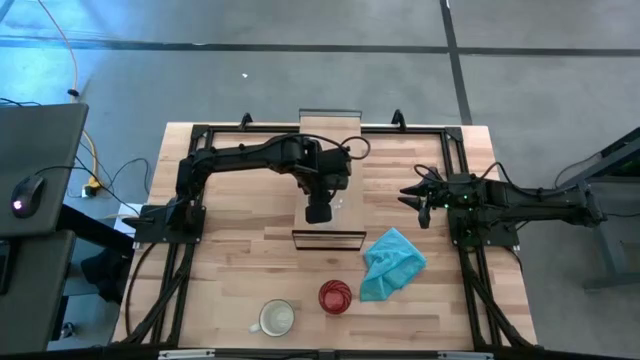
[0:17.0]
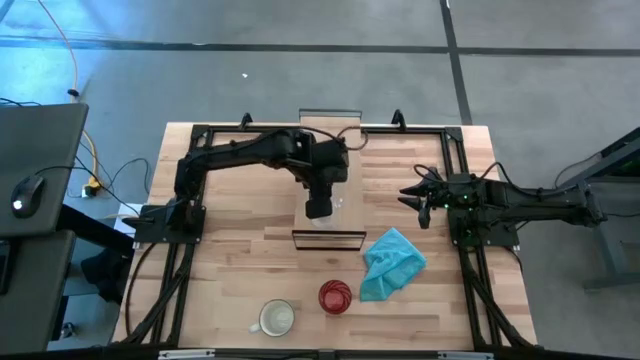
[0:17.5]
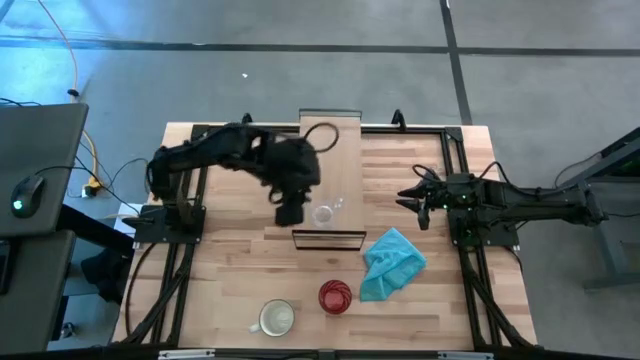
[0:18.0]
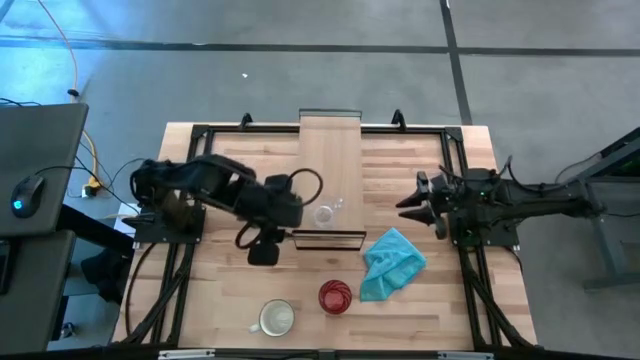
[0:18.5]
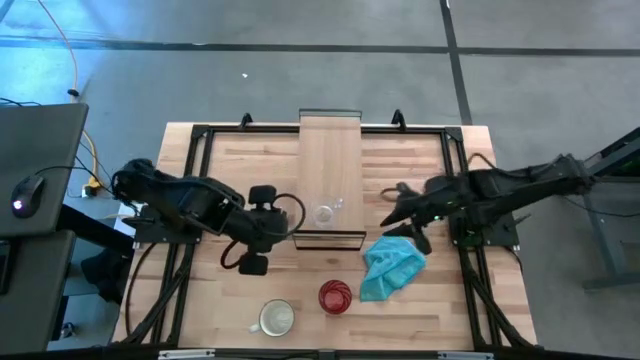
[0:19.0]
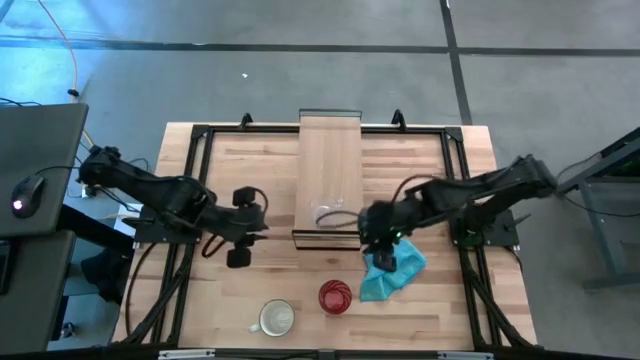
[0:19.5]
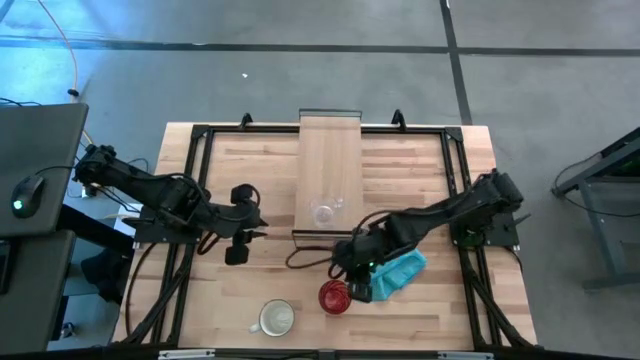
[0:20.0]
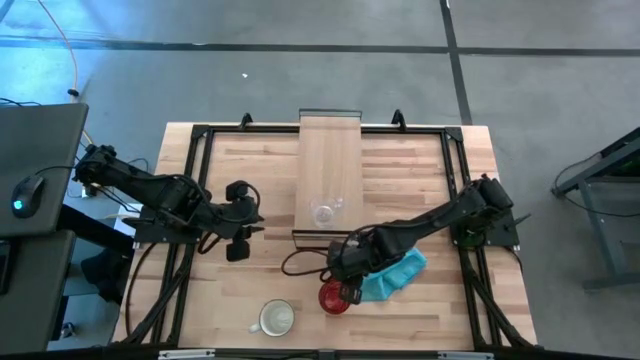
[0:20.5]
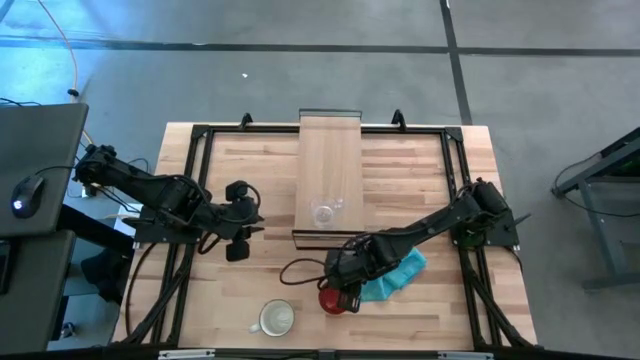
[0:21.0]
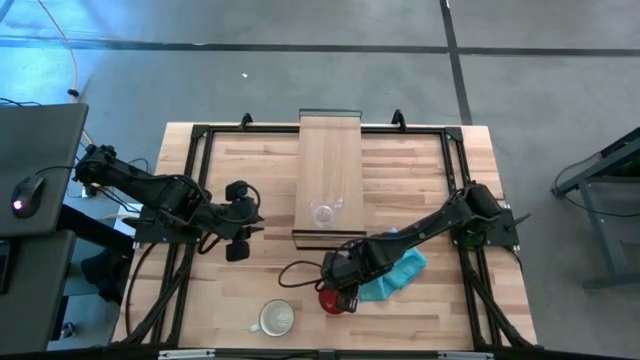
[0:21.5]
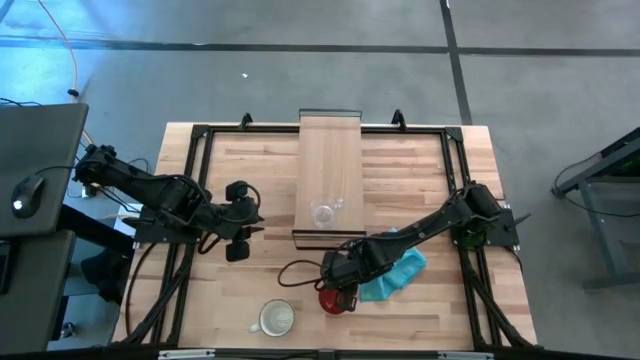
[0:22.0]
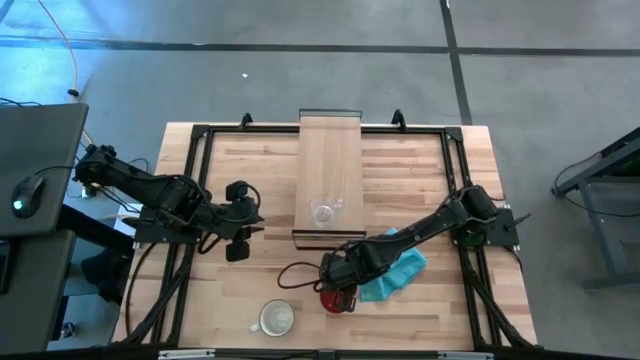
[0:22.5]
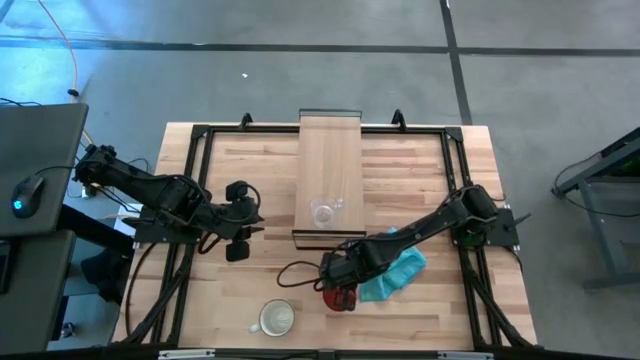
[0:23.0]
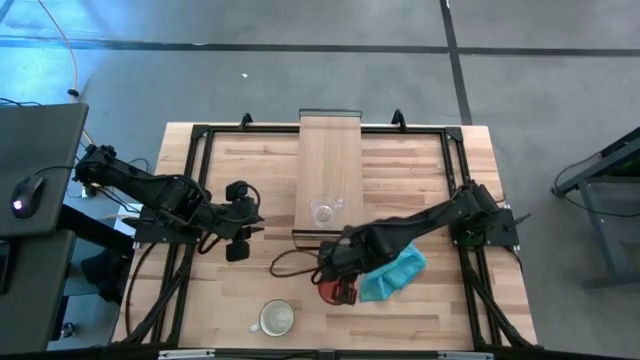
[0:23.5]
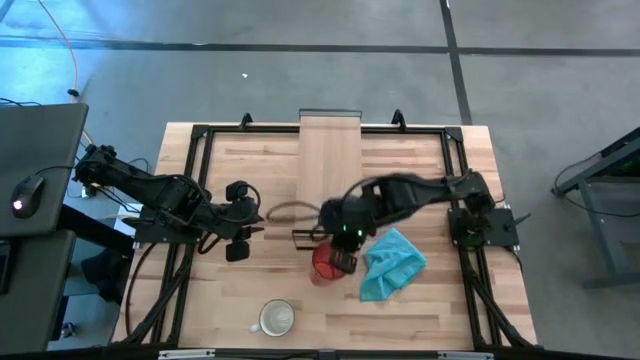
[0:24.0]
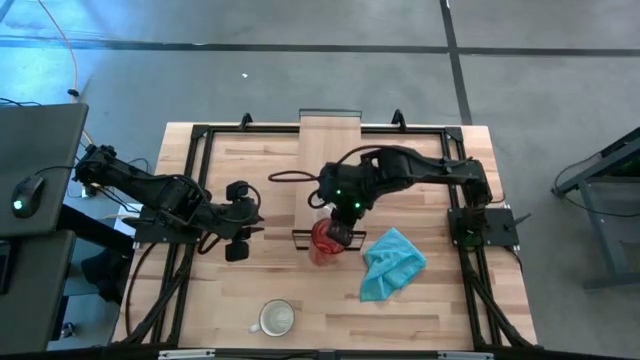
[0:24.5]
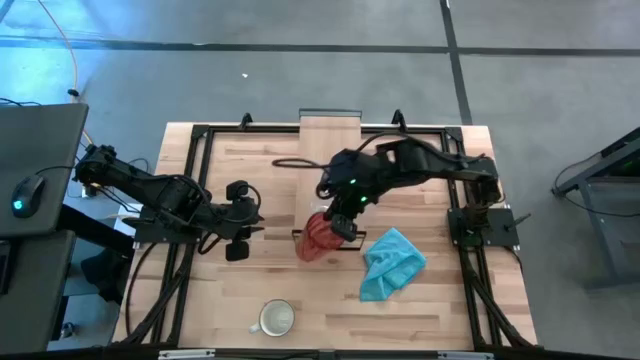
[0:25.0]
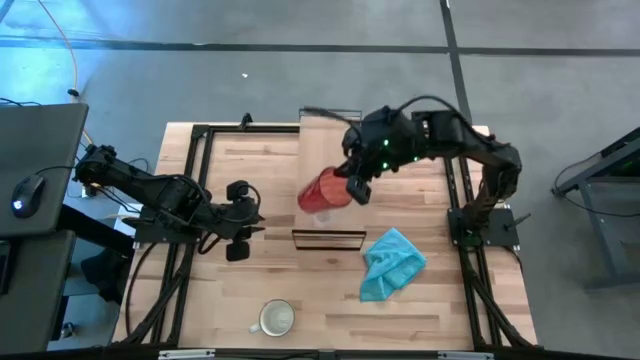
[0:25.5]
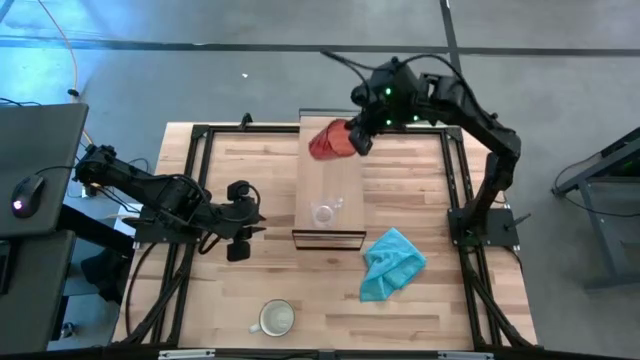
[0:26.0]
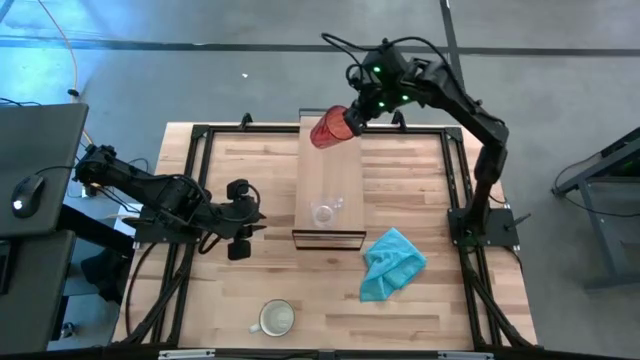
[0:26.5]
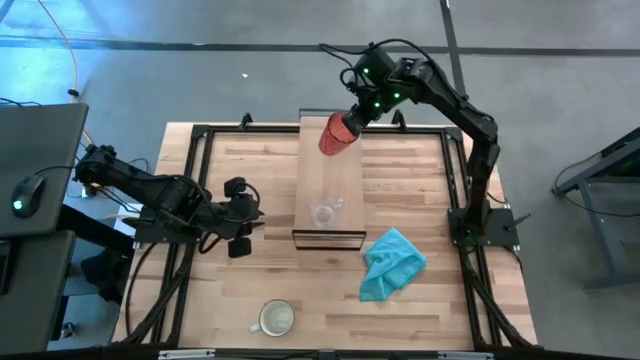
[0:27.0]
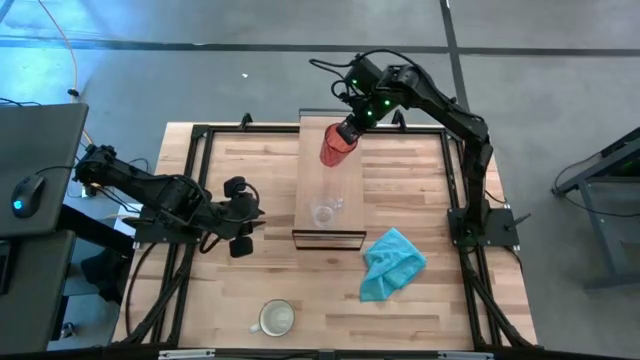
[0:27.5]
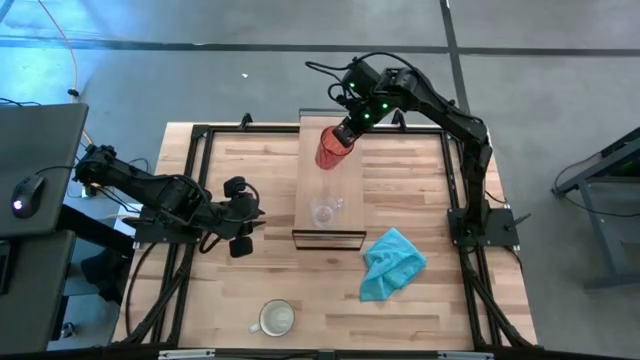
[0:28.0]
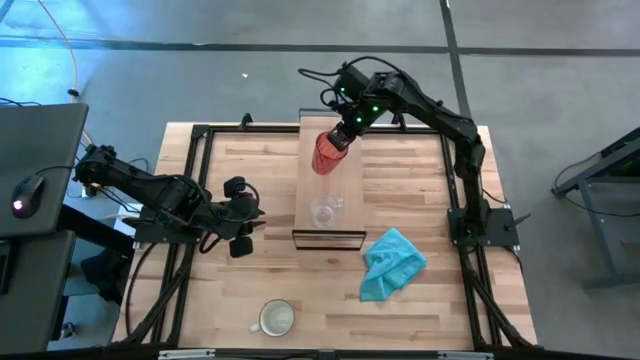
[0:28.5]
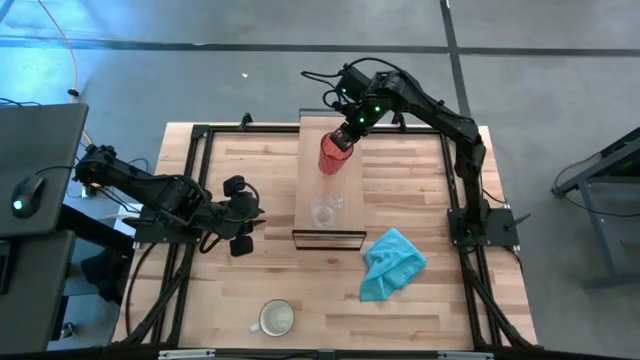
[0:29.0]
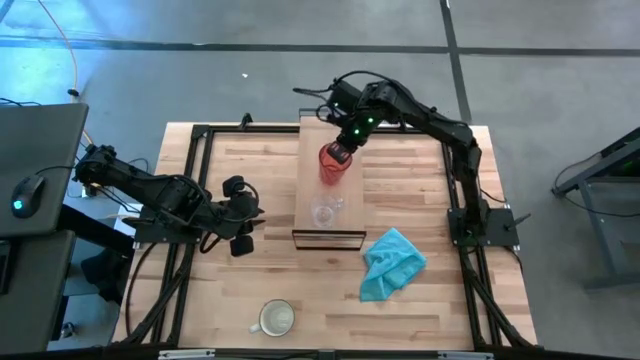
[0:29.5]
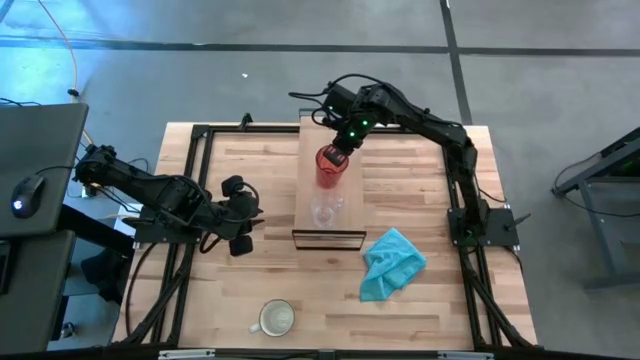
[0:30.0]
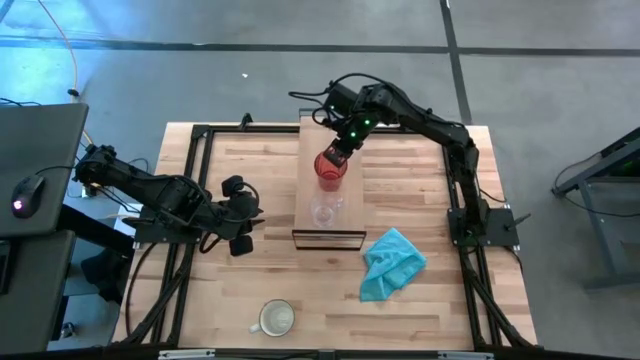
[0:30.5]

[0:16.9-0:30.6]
Task: Stack small to large cups/mugs on shelf
Put the red cup on the shelf

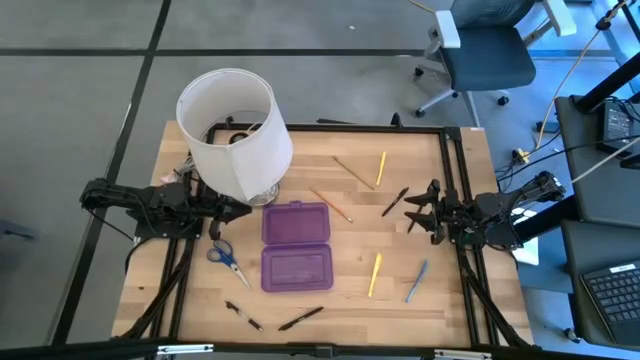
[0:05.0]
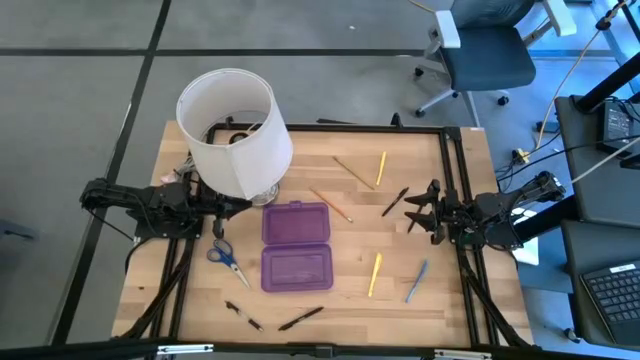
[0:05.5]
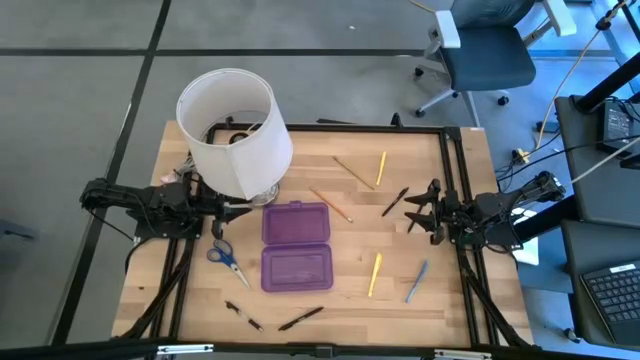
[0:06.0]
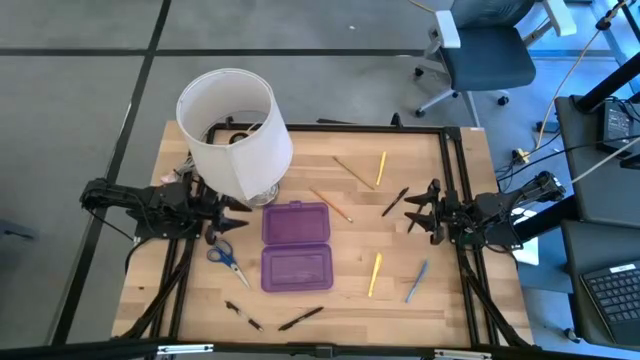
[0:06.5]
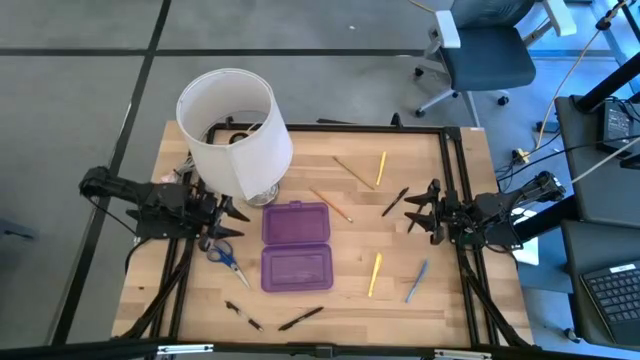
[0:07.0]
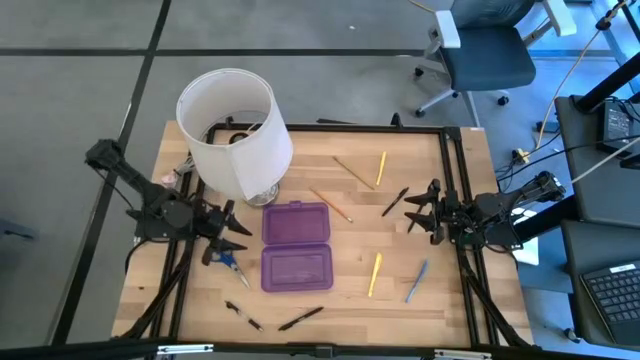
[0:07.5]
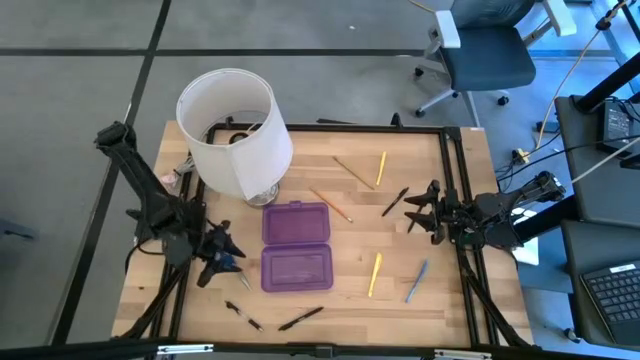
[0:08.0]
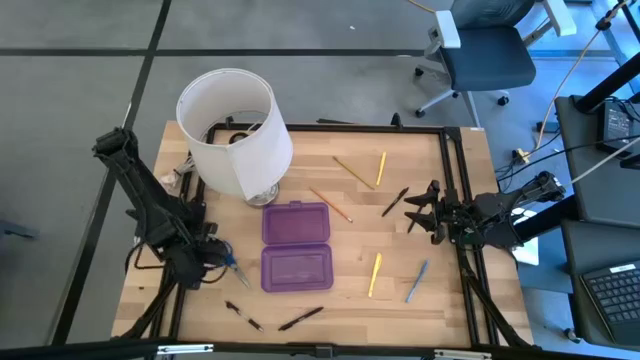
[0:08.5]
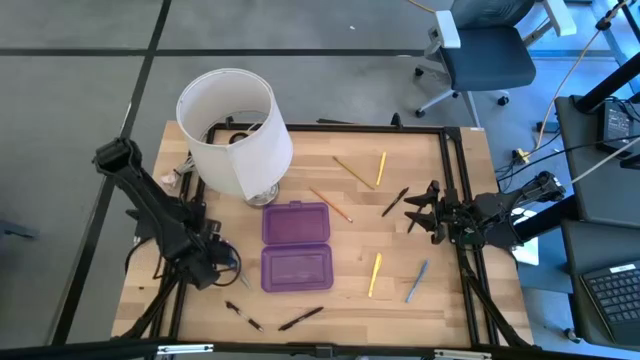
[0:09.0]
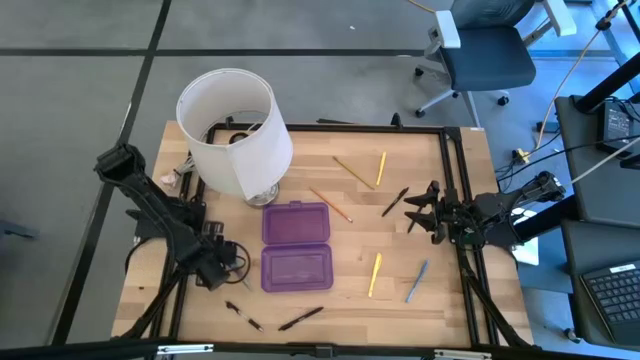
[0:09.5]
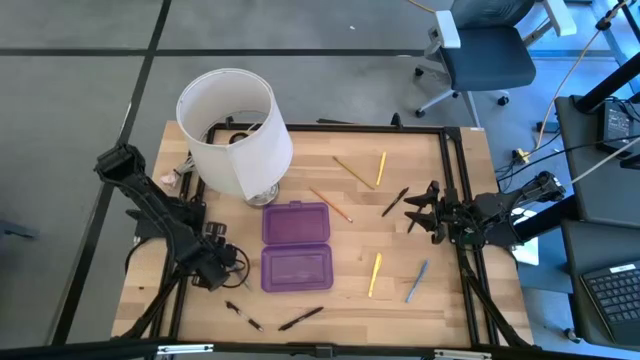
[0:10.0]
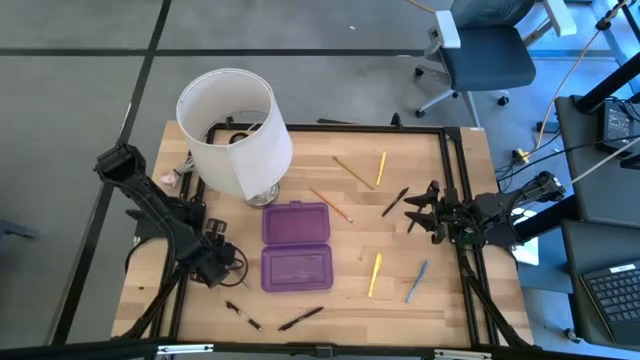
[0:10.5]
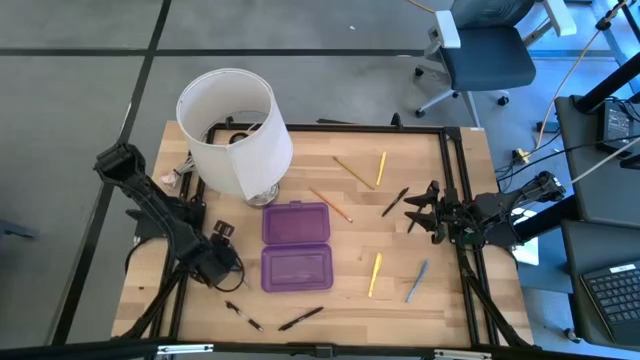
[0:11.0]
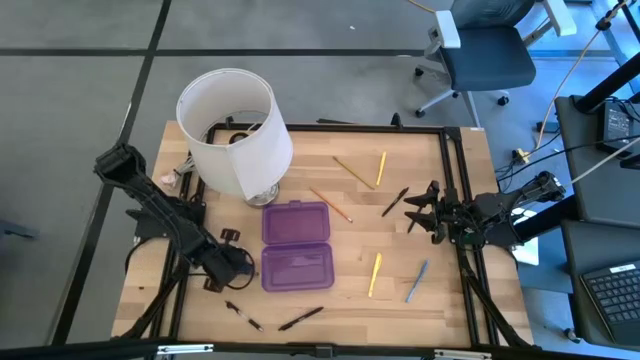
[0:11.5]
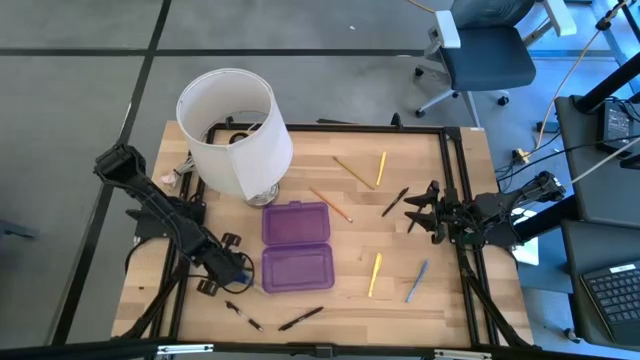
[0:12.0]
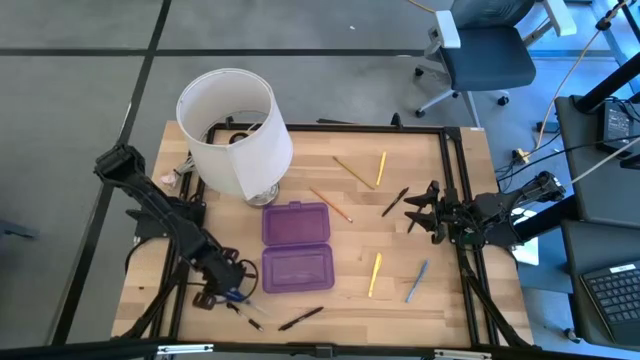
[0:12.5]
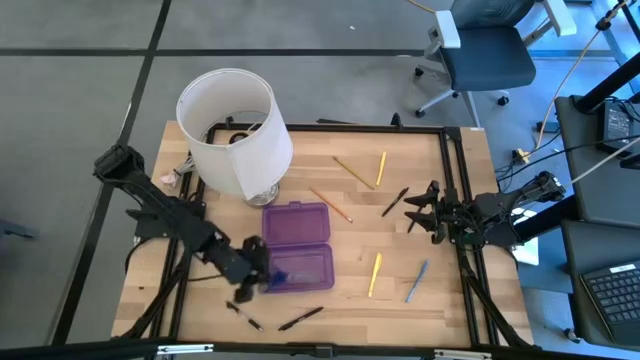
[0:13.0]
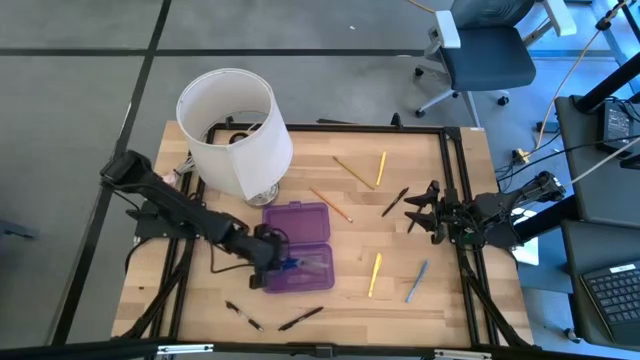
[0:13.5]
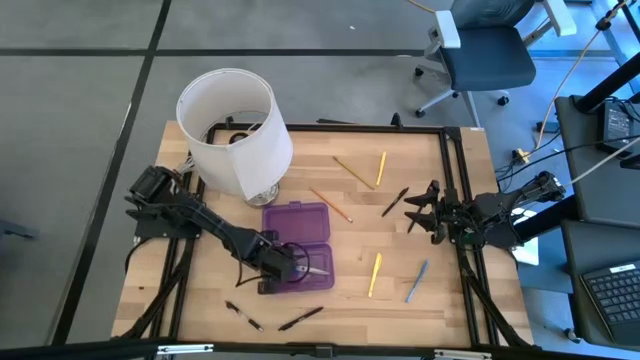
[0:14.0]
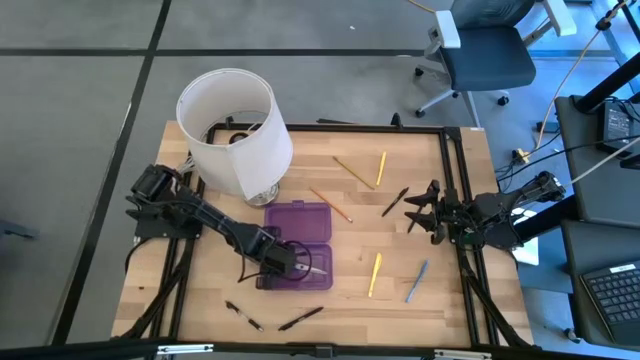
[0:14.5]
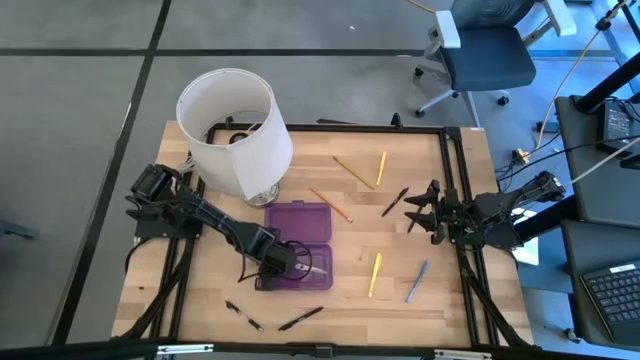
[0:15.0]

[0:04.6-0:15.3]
Task: Pick & place school supplies into a supply box
Put the blue scissors into the purple supply box
